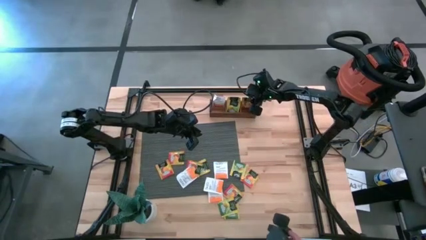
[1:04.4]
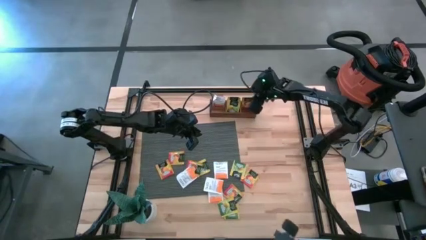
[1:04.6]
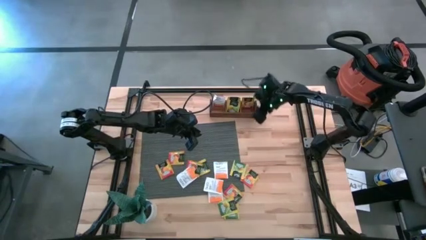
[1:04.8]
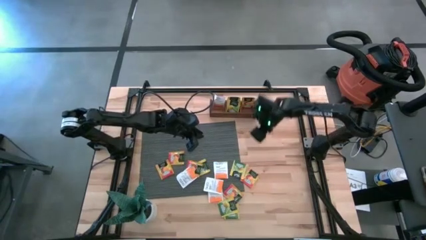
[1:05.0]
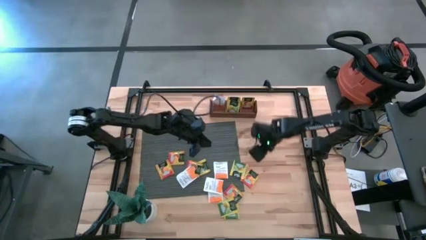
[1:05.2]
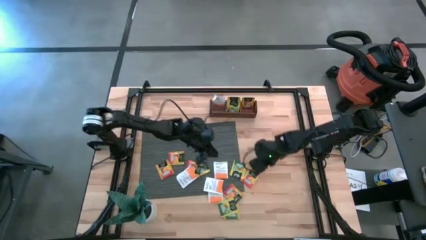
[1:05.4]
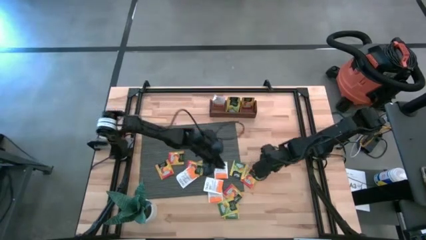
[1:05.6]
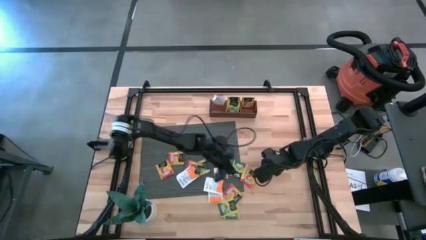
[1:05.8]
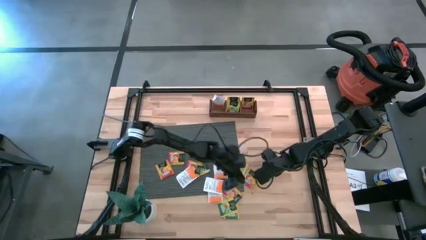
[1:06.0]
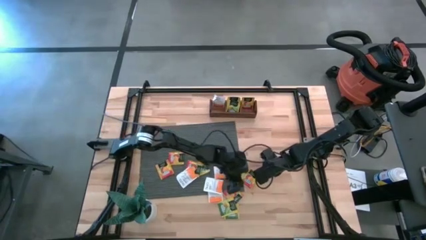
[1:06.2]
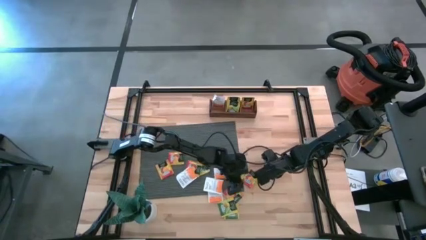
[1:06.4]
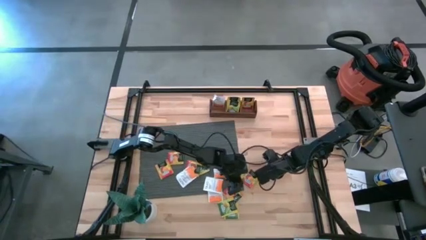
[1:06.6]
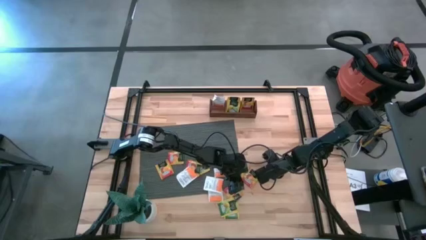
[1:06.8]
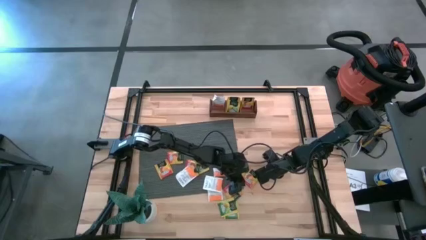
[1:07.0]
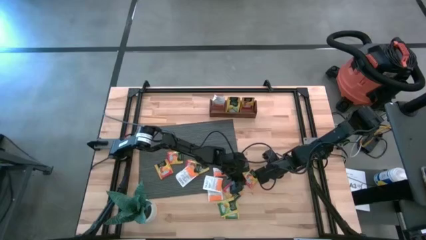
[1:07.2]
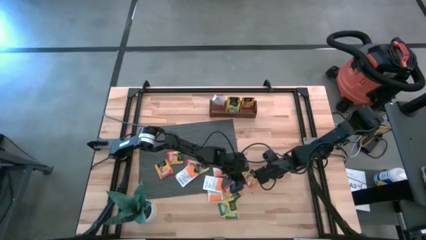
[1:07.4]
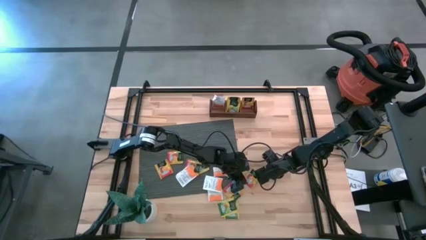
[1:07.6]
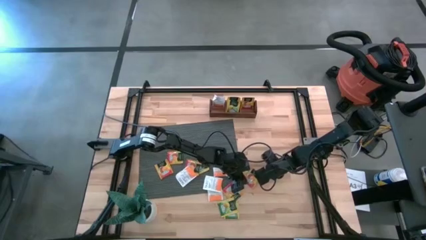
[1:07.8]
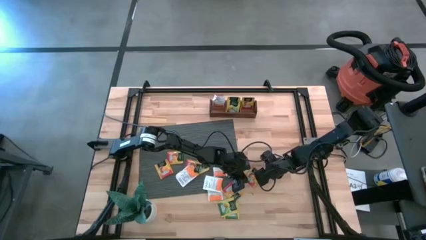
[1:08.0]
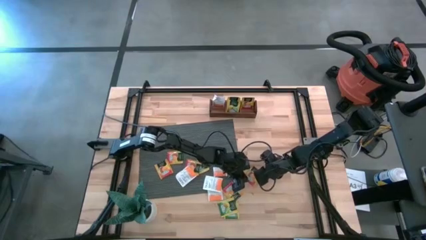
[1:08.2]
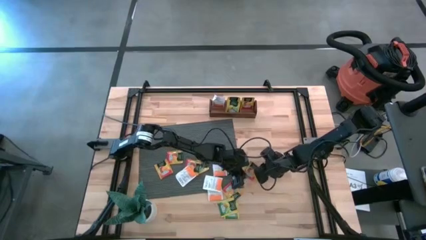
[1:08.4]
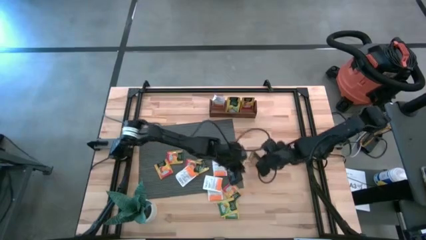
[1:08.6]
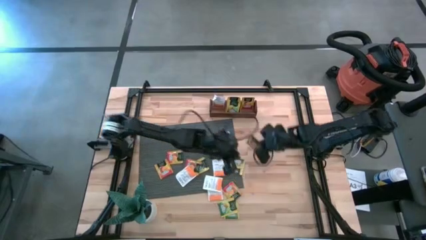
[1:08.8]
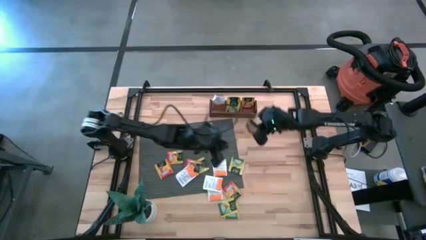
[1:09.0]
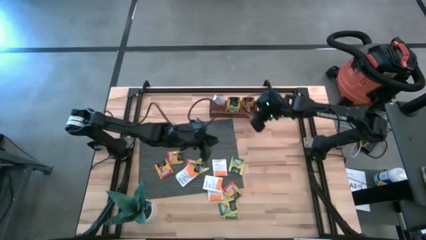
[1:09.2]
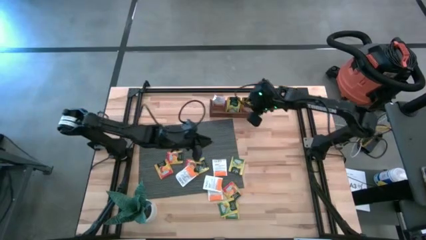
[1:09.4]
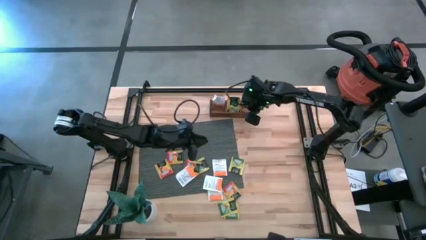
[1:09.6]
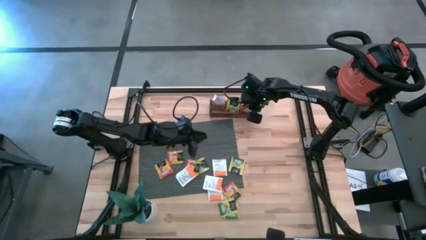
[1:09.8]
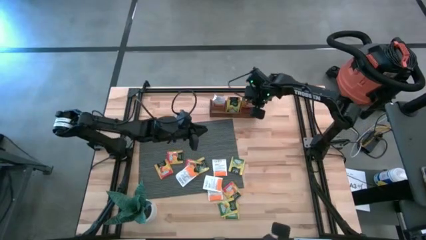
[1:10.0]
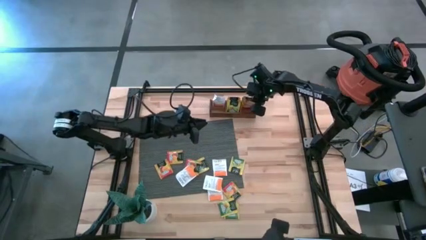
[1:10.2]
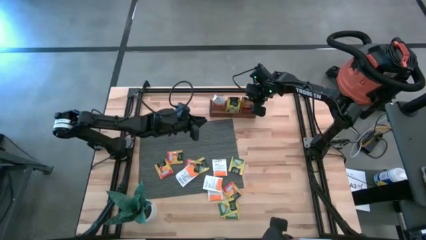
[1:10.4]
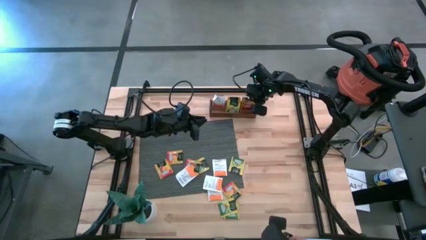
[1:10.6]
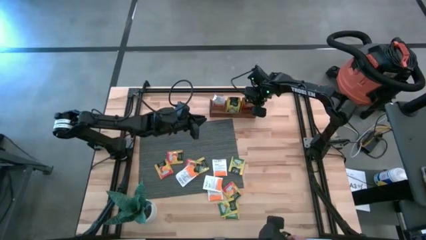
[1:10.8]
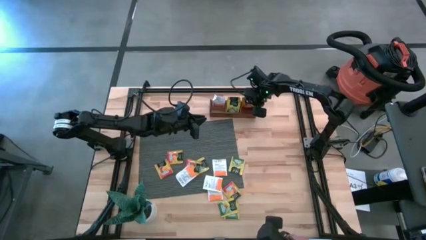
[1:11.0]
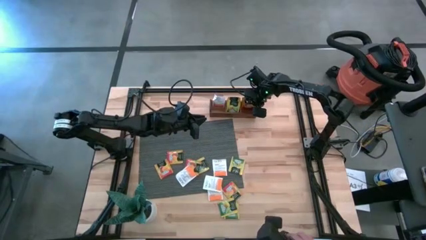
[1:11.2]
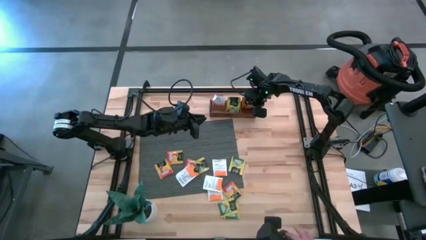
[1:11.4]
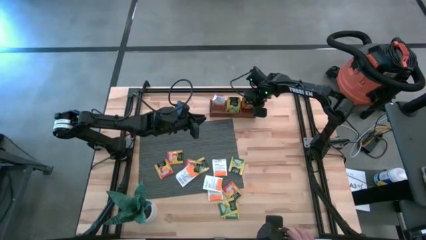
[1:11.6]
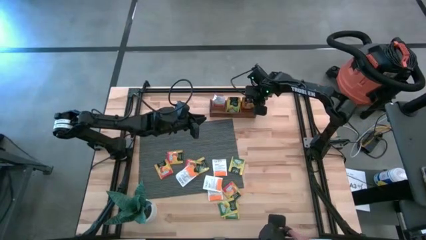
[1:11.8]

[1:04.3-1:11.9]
Task: Pick & Place Tea
Put the orange tea bag into the right section of the wooden organizer

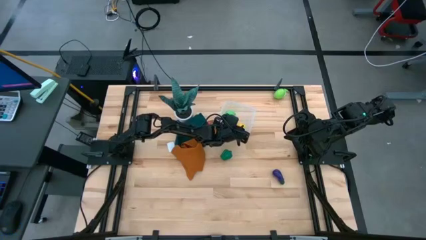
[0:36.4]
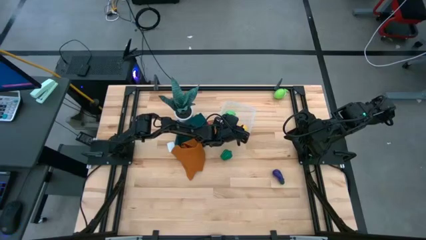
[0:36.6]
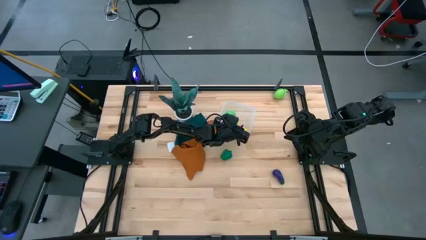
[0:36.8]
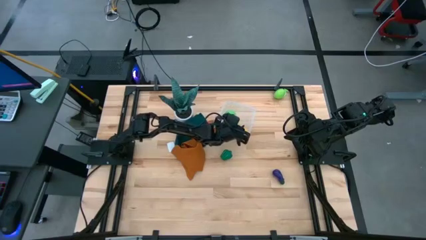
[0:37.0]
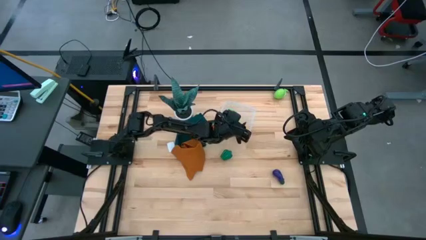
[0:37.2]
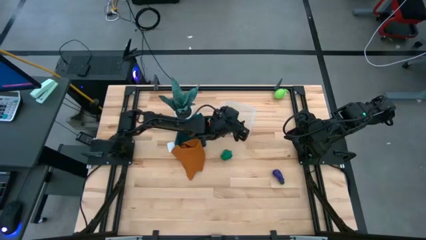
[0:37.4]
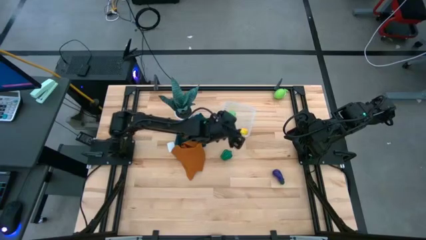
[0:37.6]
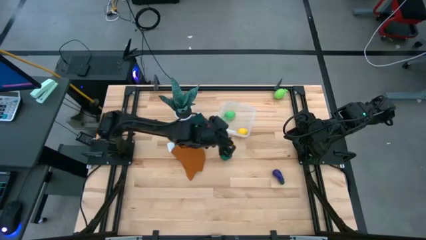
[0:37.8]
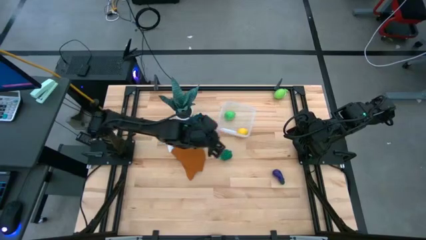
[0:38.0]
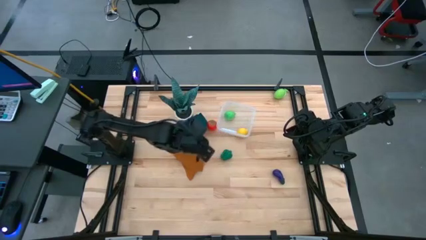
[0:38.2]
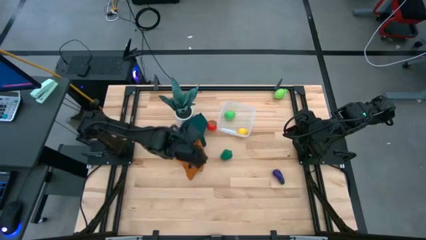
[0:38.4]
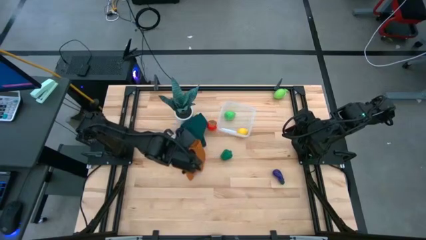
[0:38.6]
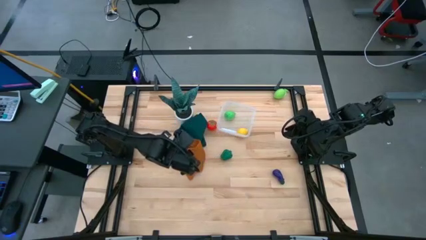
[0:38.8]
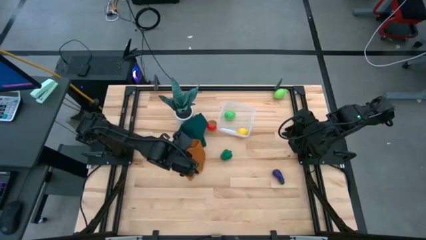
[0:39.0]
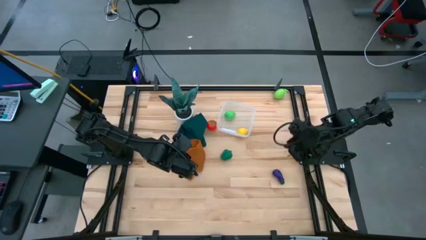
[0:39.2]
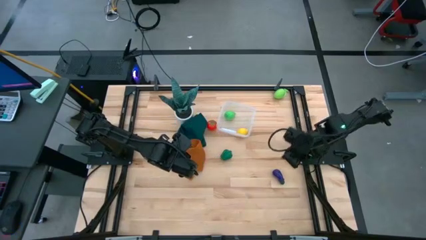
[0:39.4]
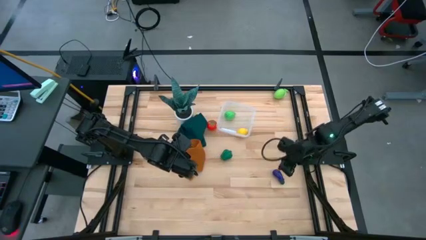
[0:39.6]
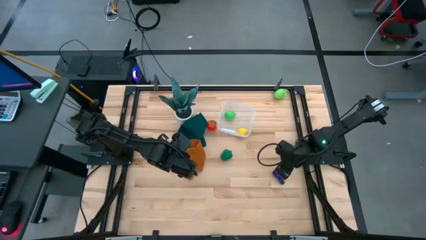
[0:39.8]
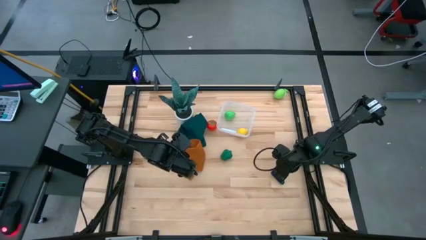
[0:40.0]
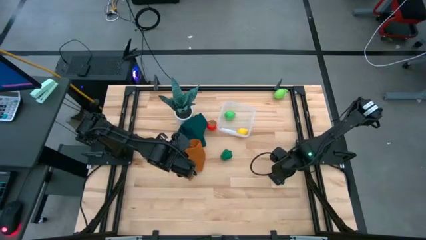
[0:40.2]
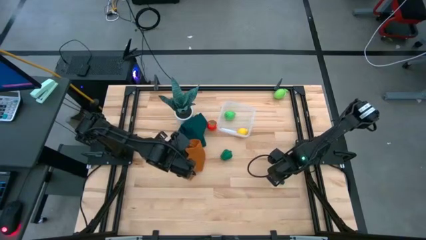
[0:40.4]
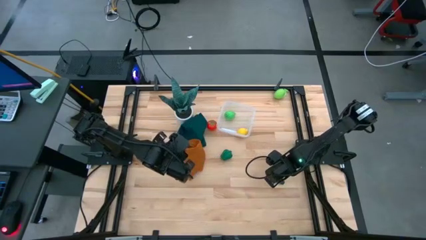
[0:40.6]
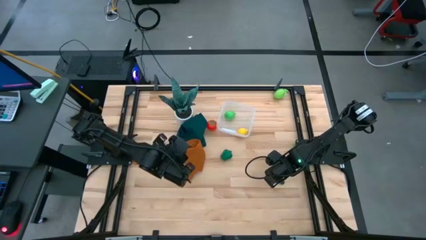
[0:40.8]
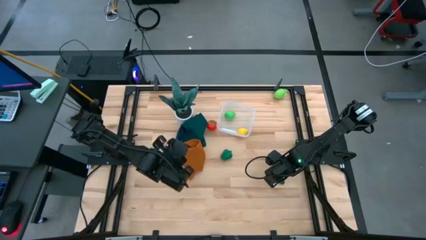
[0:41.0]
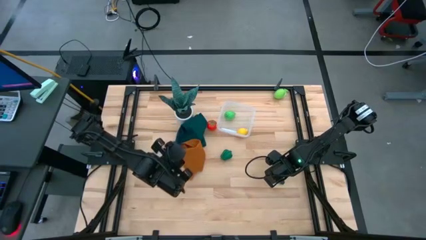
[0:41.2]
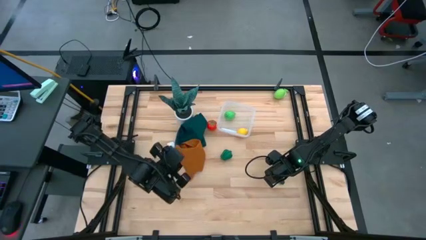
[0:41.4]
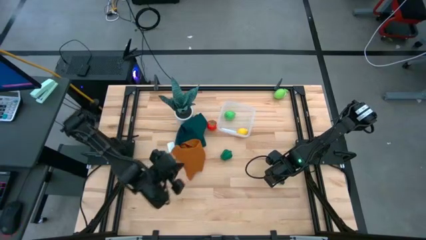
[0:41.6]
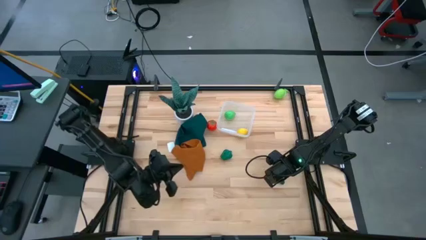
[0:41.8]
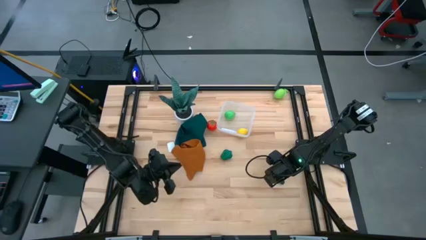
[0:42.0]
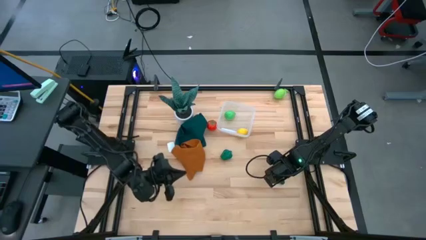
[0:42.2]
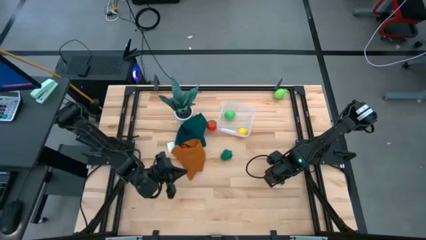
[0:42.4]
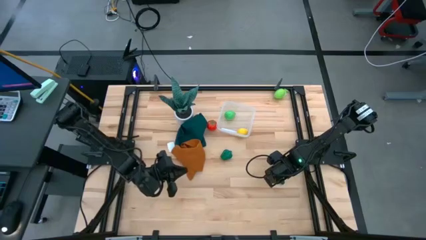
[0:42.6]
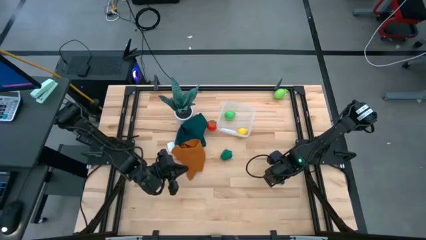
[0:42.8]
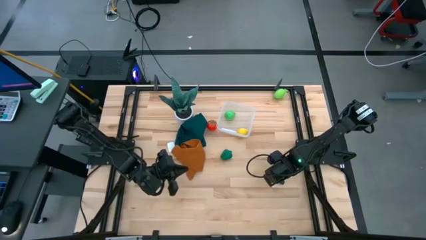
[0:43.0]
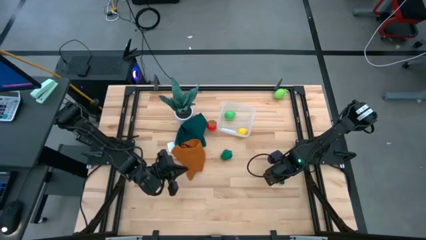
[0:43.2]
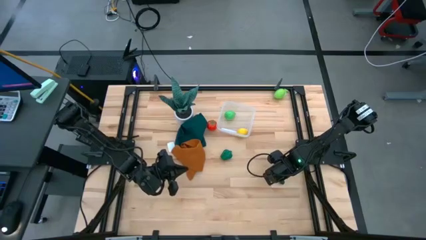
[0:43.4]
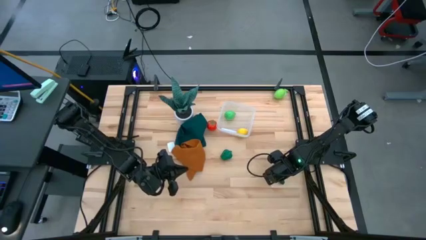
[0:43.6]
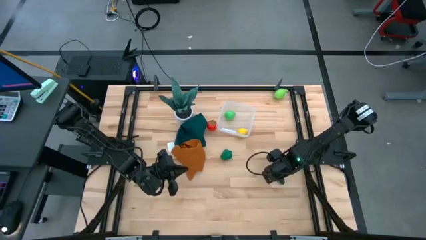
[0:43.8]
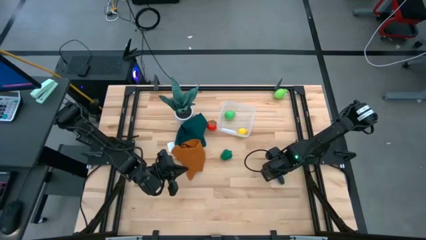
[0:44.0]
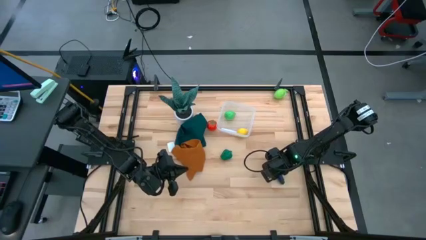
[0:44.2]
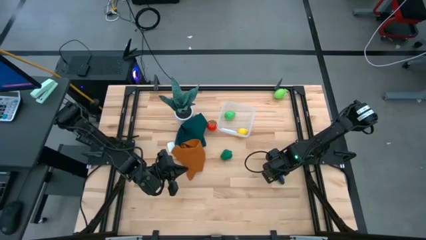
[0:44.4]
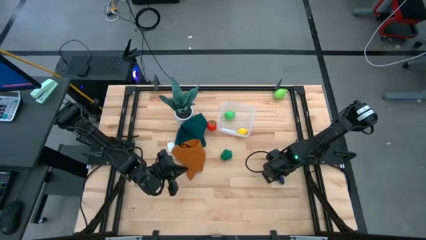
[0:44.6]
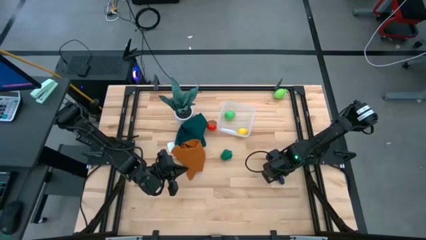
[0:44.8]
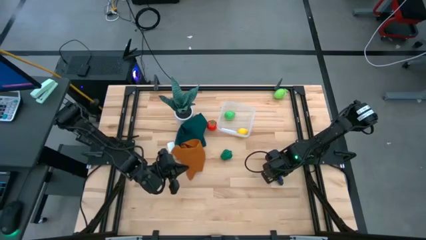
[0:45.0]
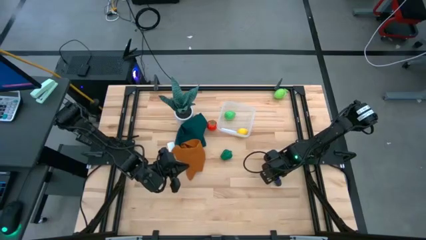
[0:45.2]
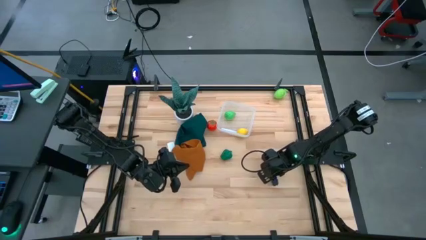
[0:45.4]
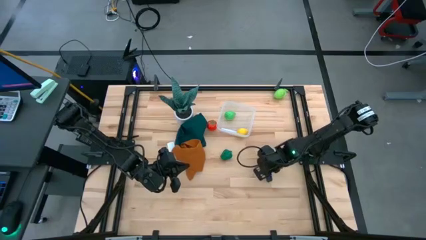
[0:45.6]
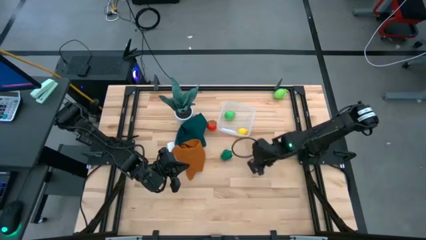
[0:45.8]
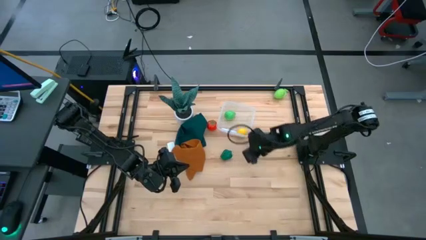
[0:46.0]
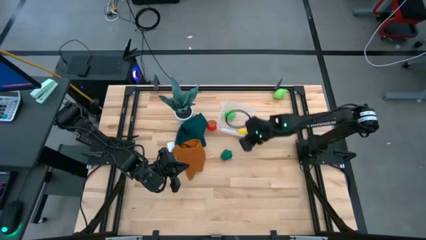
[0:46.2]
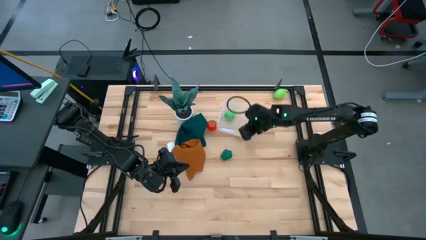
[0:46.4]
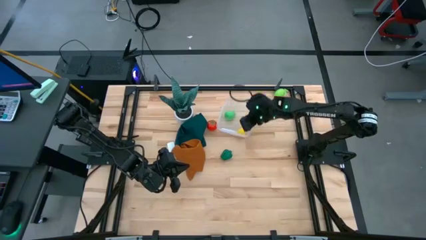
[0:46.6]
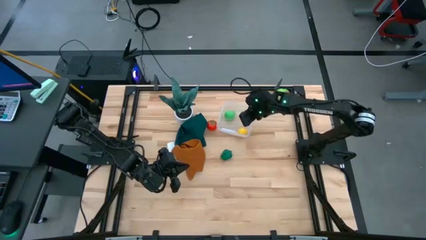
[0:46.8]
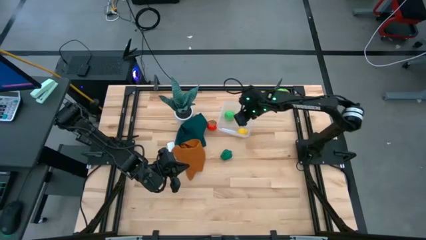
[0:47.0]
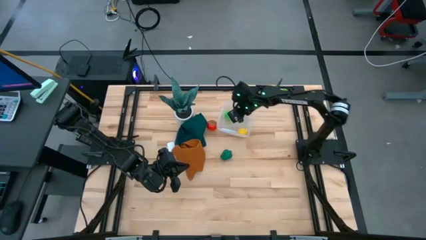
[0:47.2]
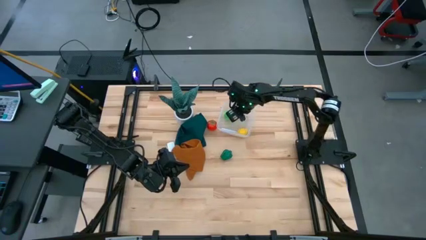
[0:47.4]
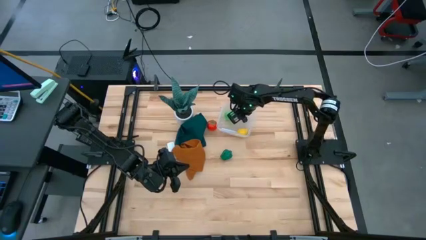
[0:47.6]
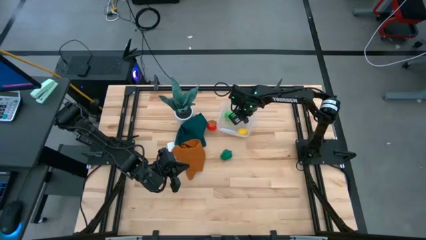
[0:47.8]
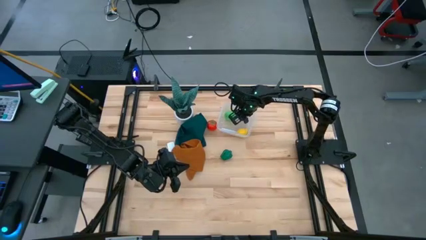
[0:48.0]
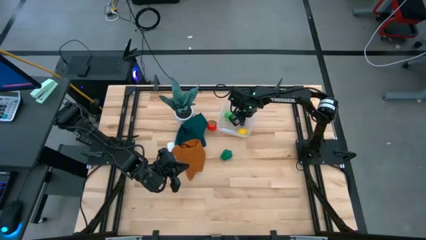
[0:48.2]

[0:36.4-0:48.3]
Task: Pick and placing Produce into tupperware
Put the purple eggplant into the transparent bin
